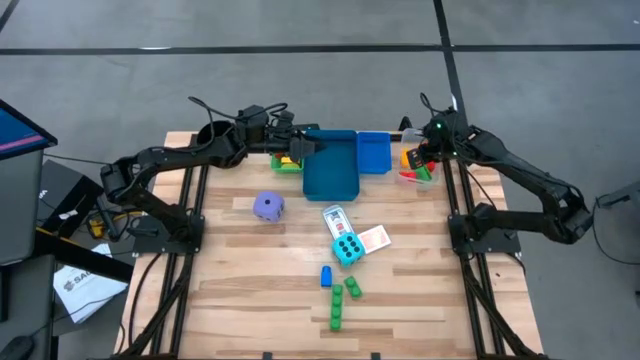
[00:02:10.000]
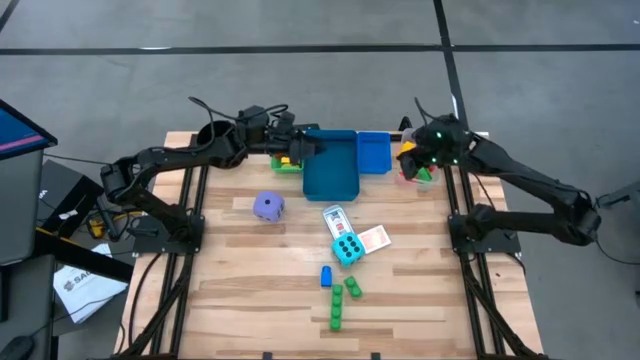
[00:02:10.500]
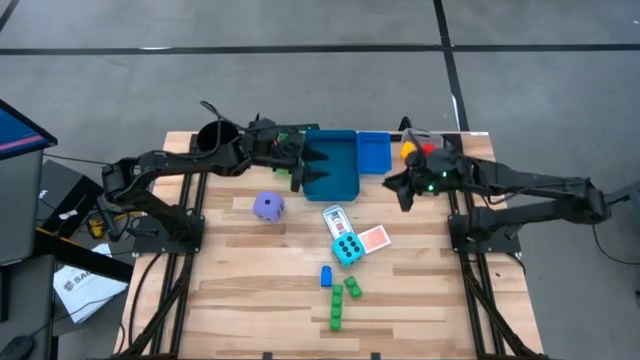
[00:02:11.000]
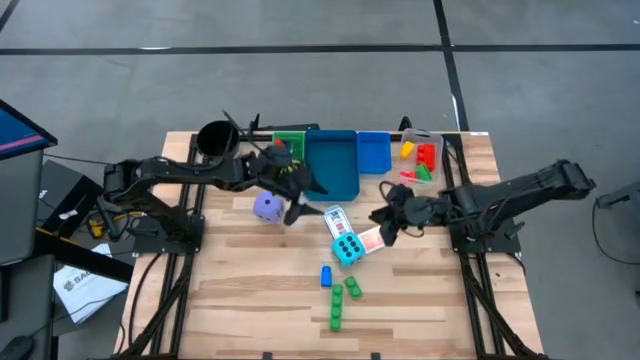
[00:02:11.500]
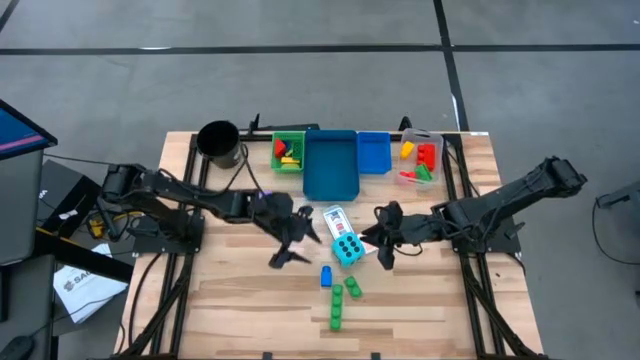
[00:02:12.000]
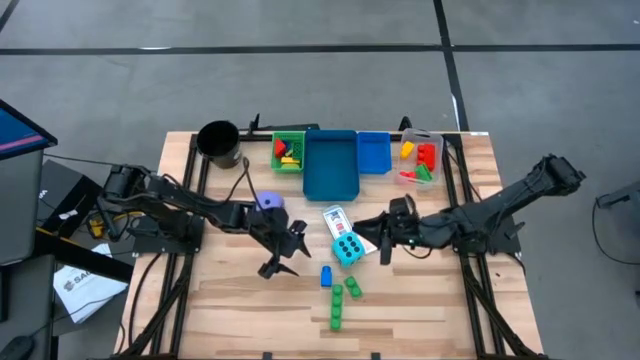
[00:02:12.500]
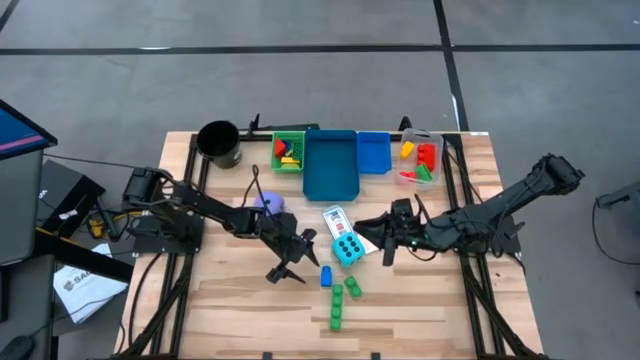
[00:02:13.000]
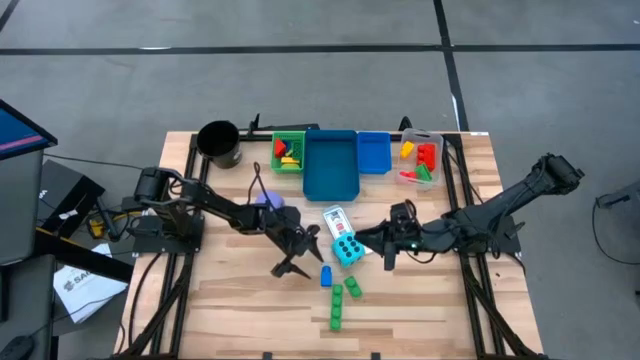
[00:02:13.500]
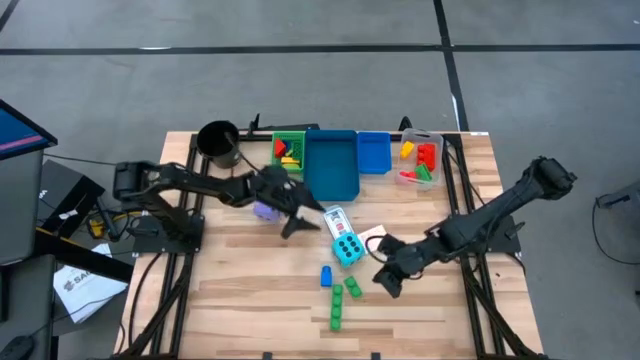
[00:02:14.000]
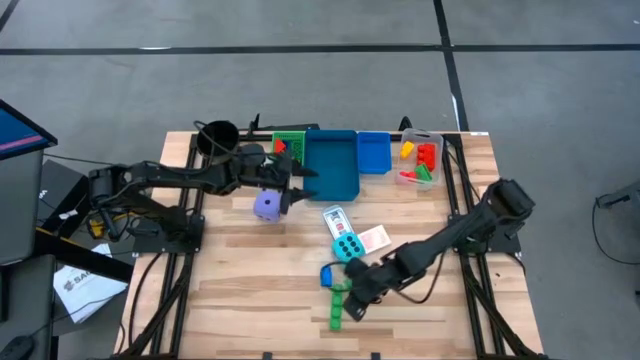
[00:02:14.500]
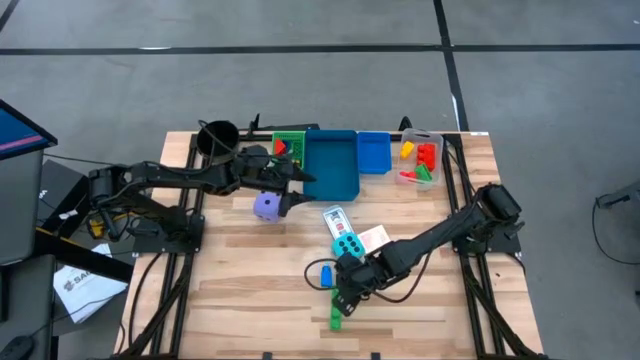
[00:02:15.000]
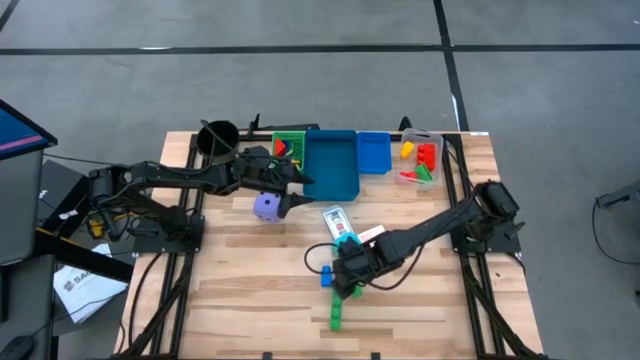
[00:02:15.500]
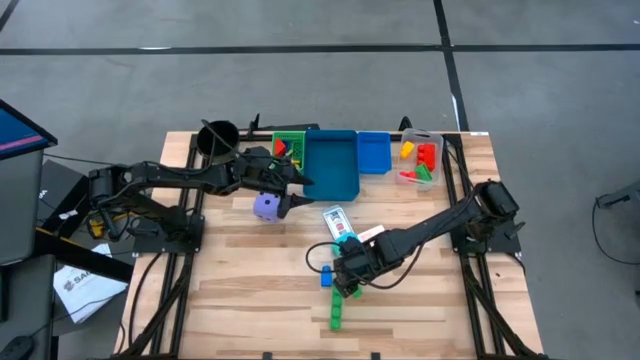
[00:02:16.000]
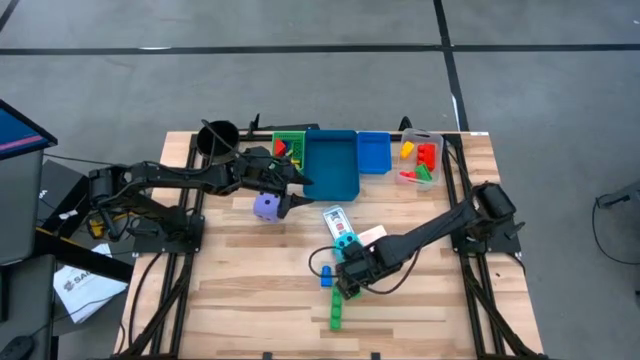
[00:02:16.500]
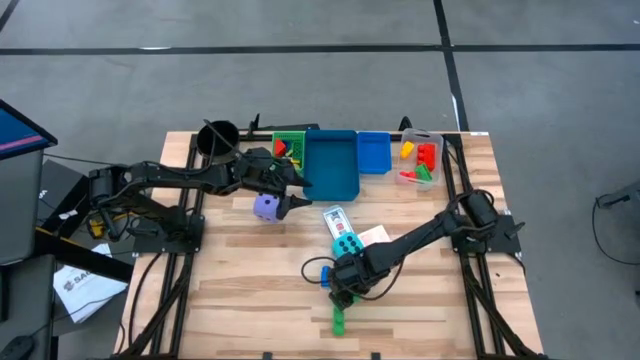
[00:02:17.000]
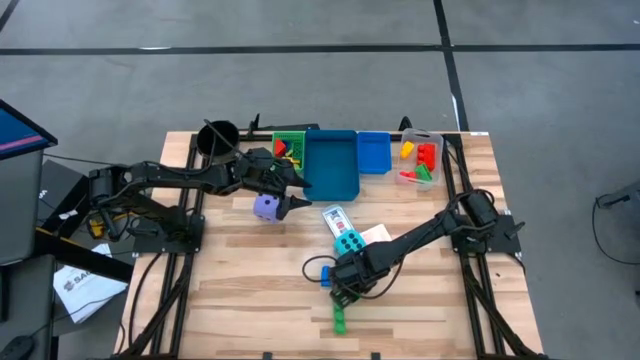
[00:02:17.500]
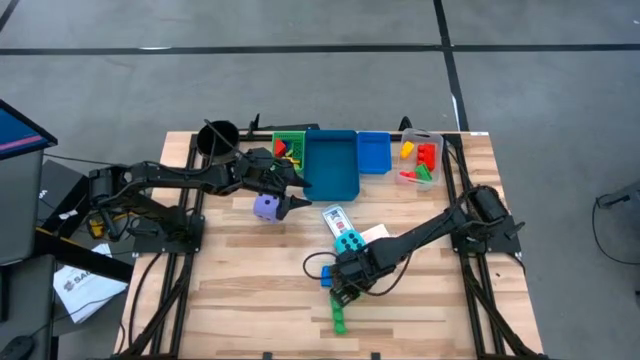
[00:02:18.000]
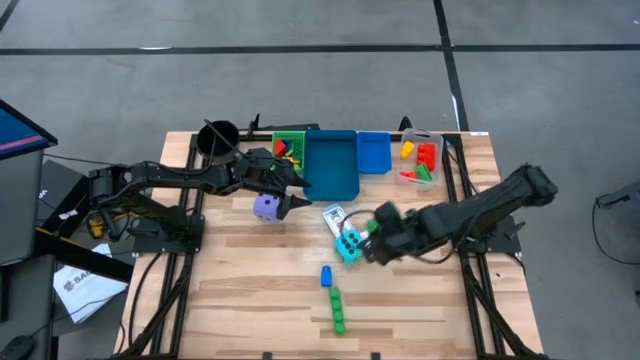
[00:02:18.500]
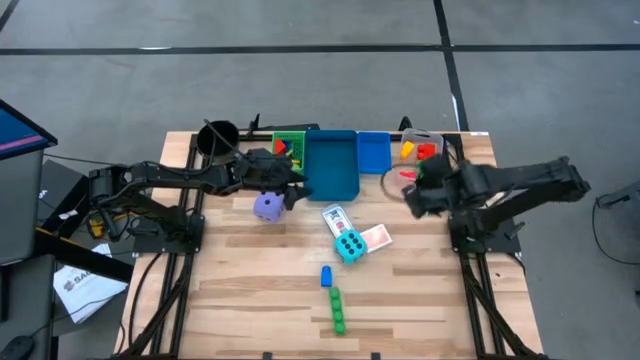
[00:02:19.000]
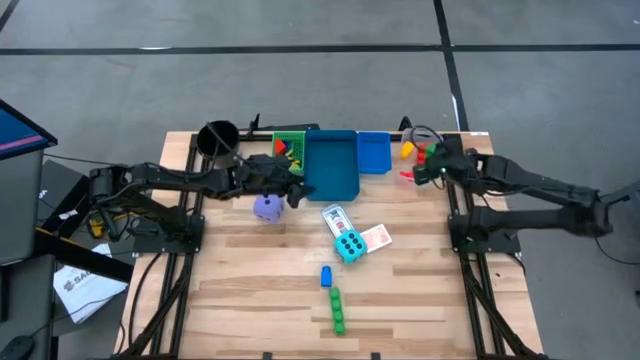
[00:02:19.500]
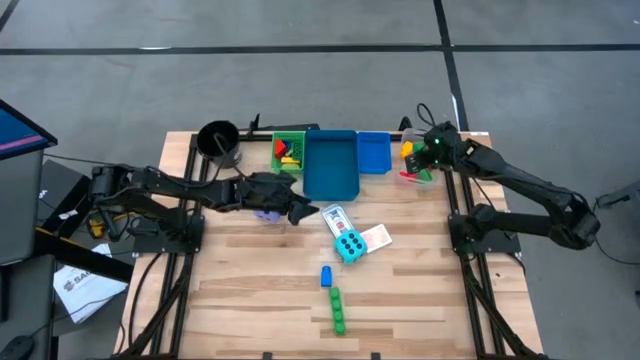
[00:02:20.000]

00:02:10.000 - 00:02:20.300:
Task: Pick & Place Toys
Put the large green game piece into the transparent bin

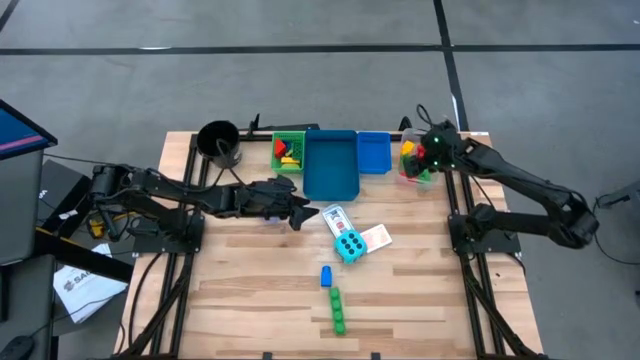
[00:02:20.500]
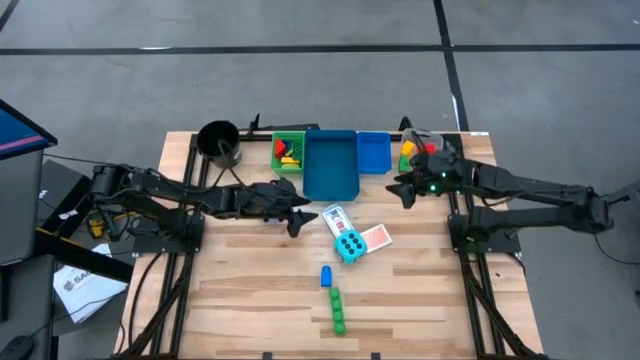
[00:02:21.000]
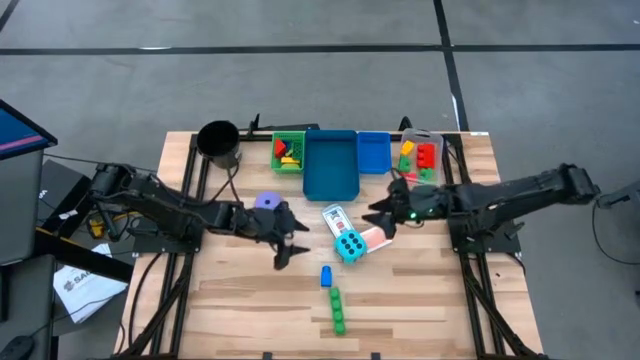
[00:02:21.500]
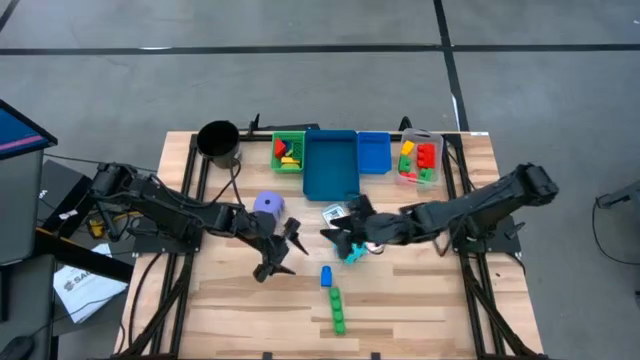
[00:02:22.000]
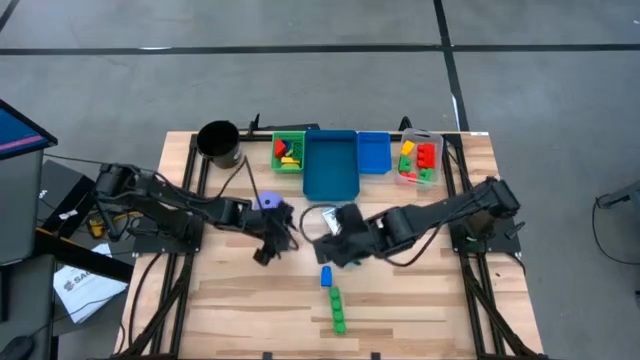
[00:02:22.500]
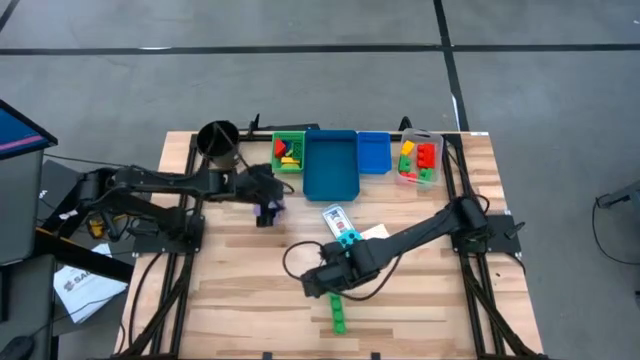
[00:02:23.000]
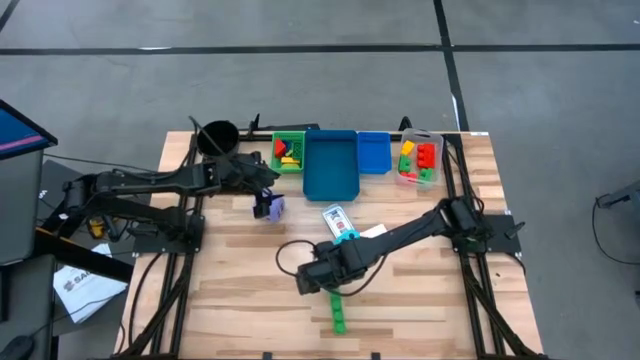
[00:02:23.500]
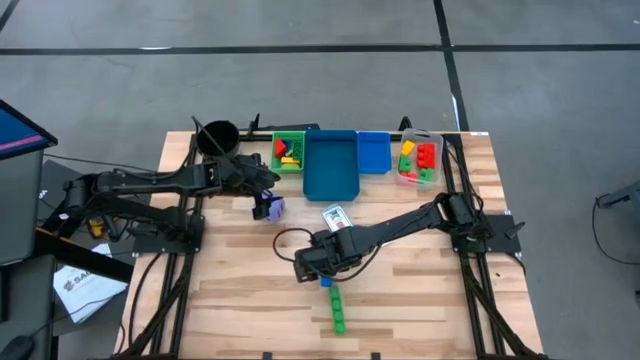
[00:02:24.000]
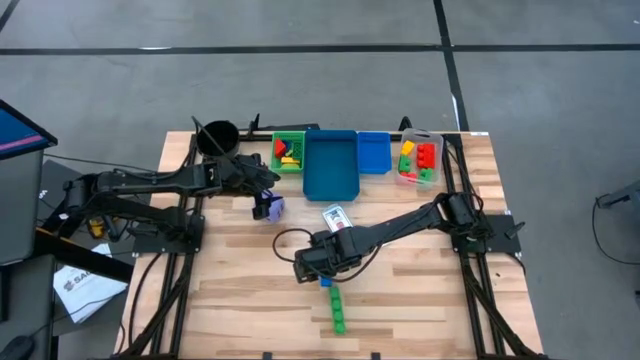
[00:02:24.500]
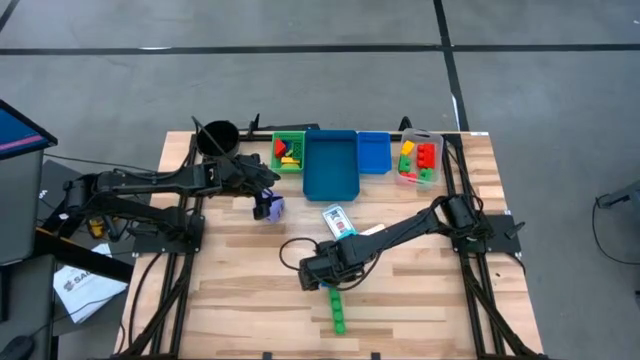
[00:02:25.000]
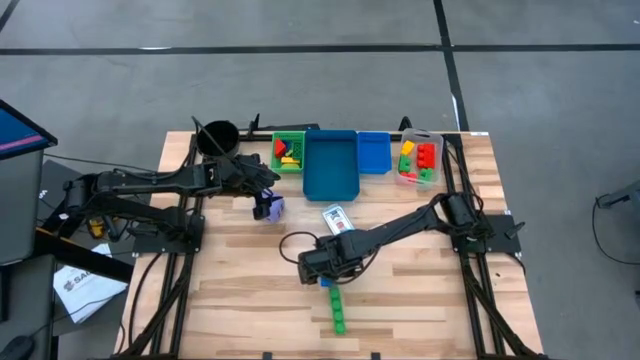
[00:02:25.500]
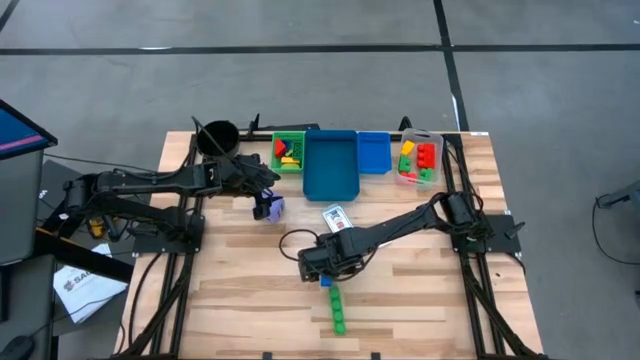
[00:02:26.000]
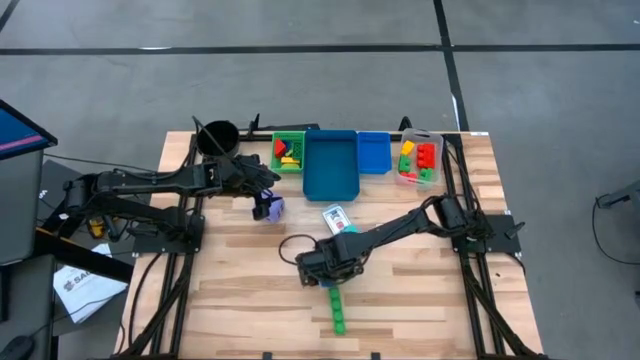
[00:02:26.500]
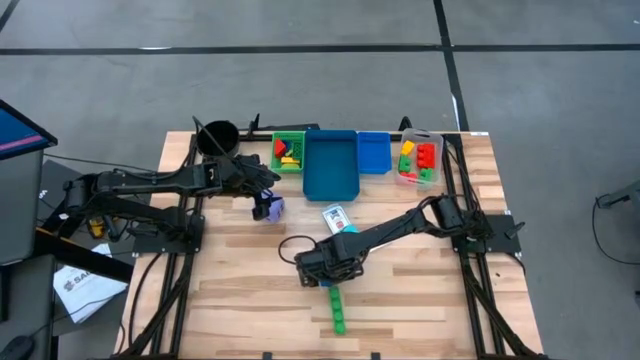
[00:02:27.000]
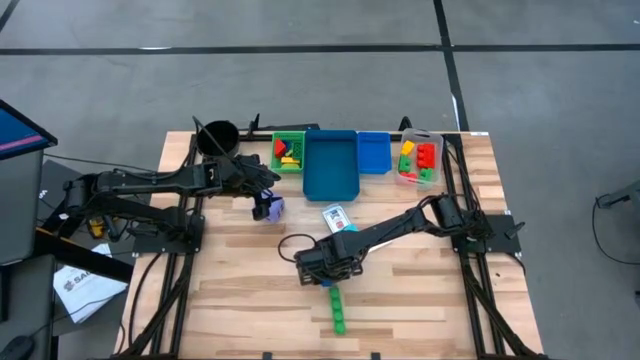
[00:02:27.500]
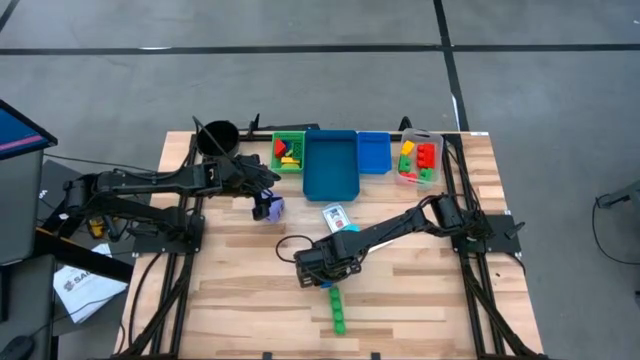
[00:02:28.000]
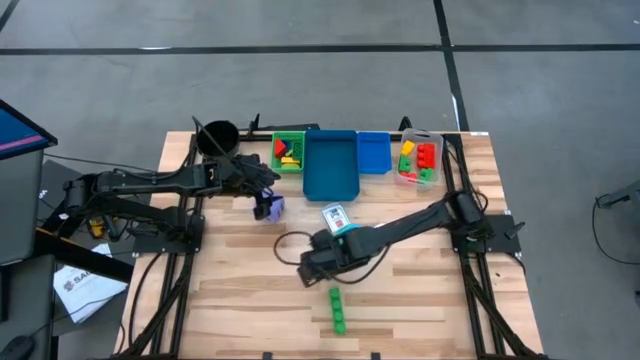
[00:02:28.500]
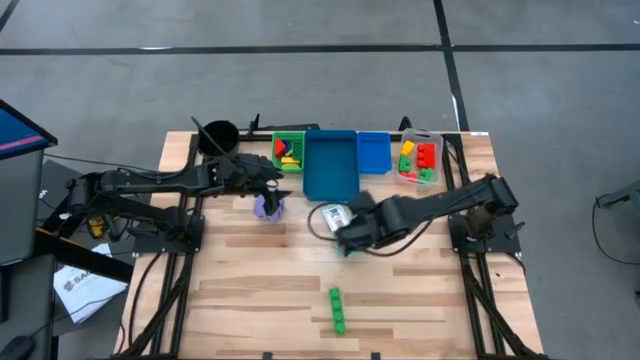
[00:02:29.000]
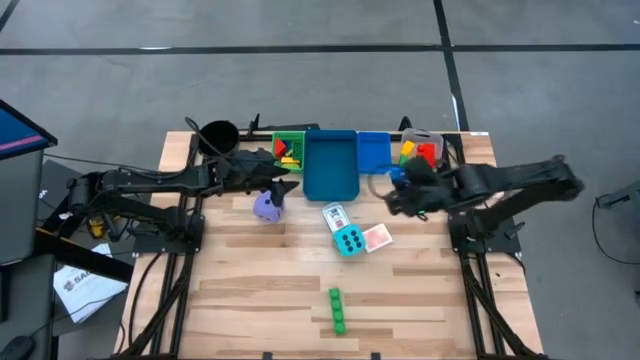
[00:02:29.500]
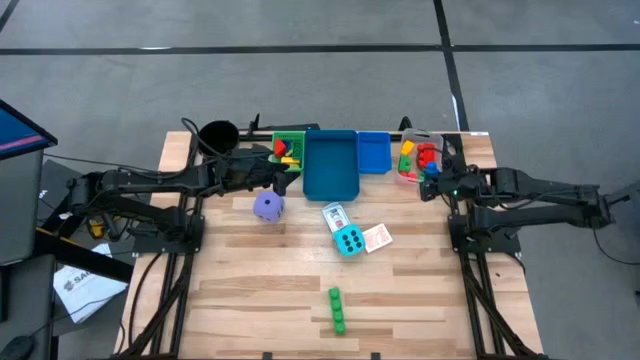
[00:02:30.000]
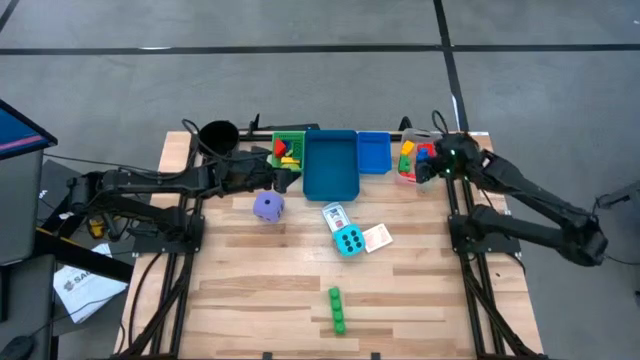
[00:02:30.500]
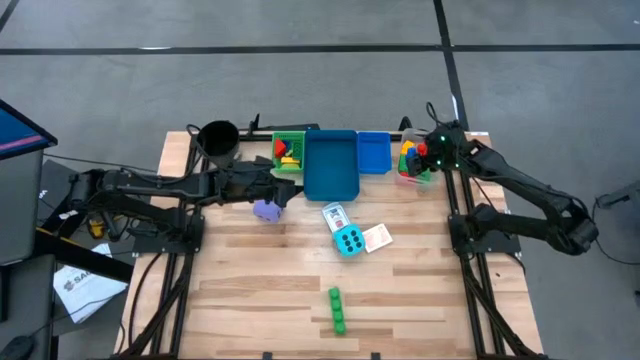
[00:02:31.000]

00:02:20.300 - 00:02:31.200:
Put the large blue game piece into the transparent bin
